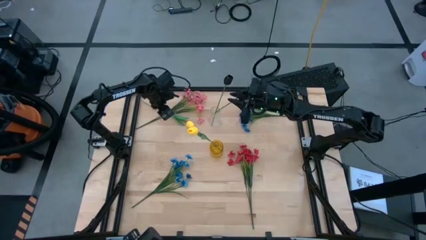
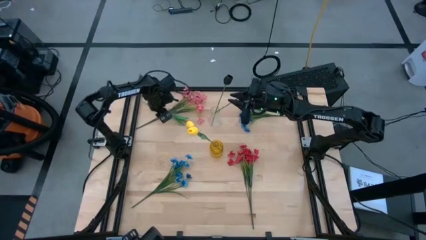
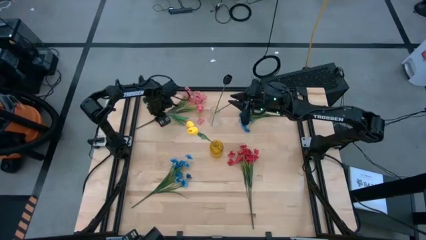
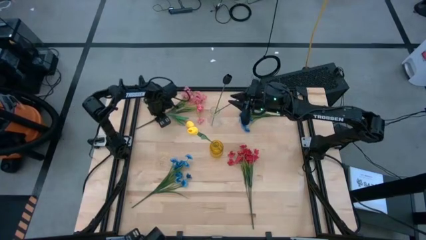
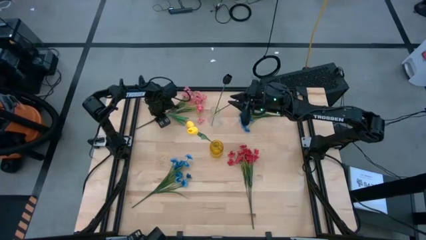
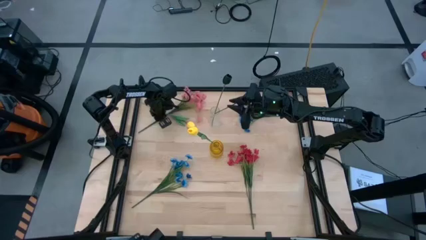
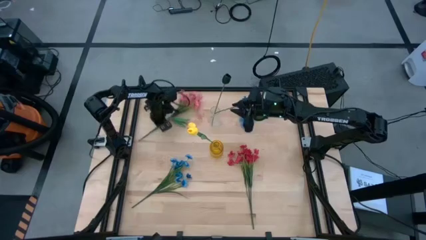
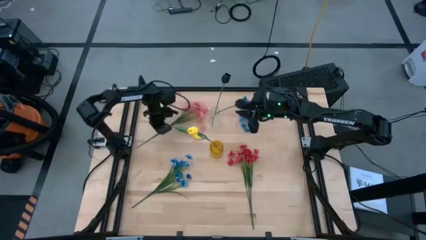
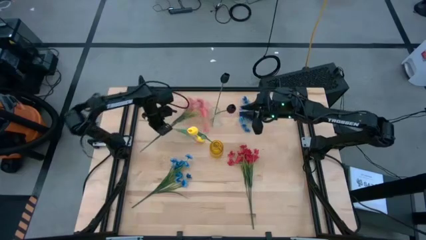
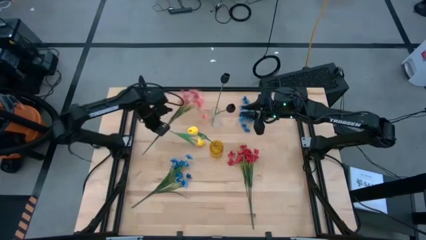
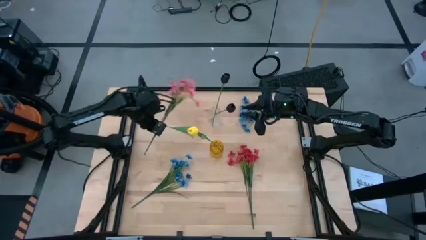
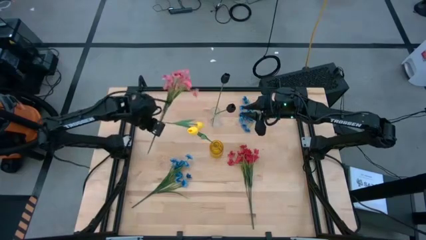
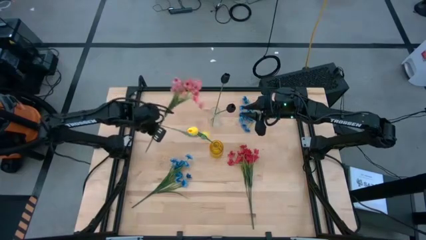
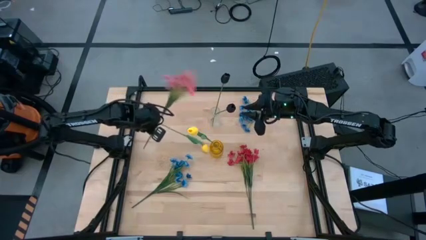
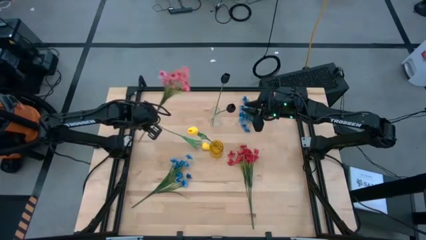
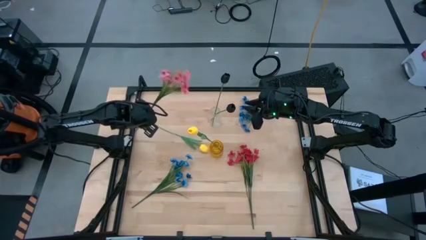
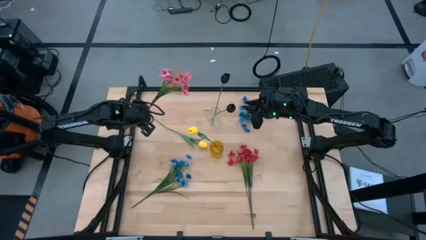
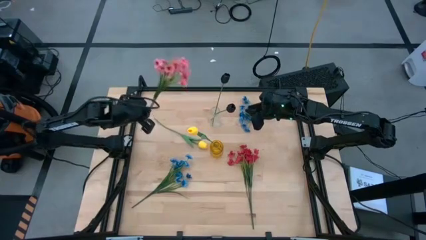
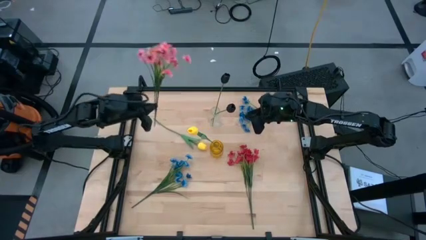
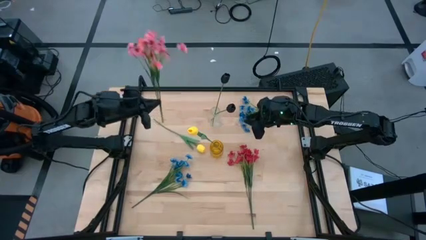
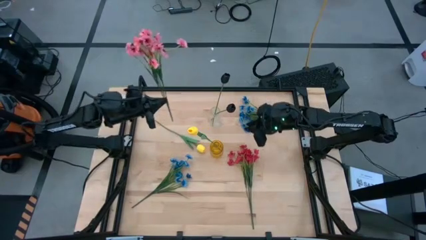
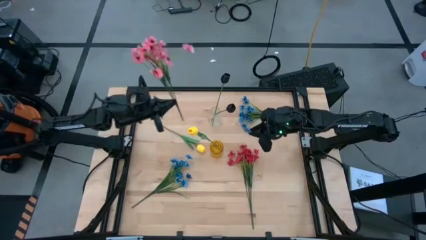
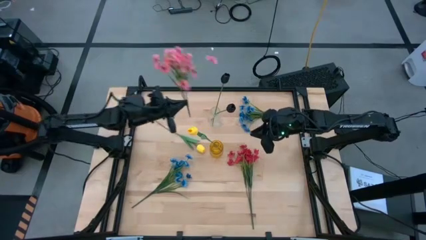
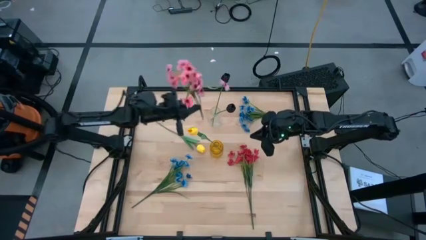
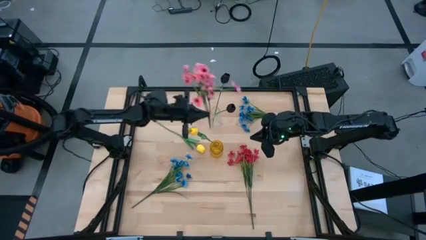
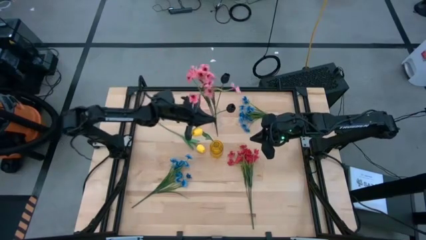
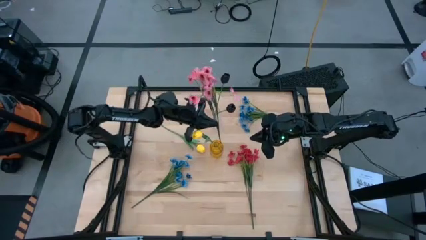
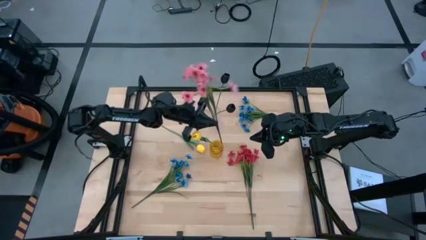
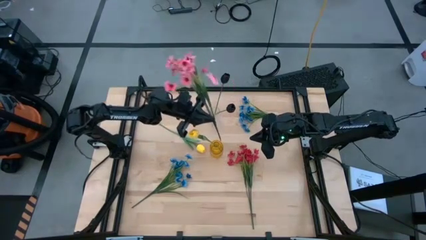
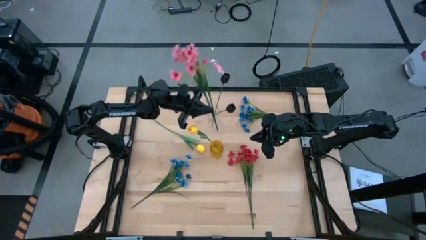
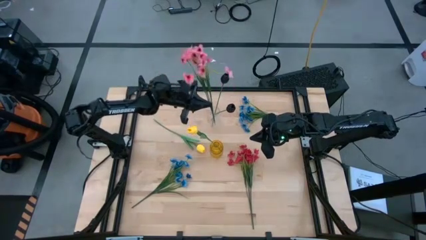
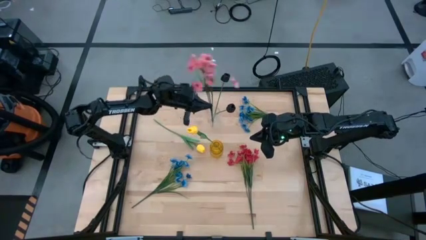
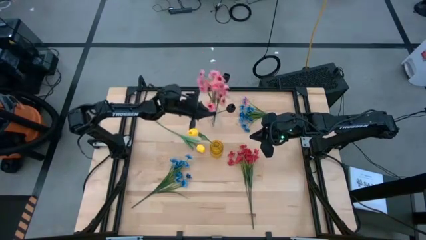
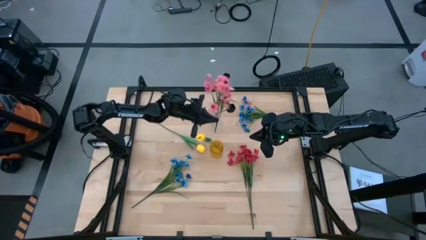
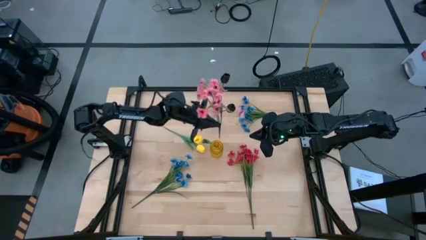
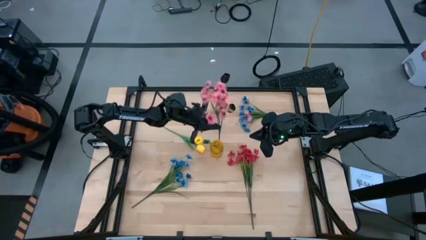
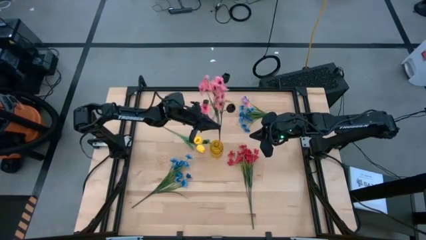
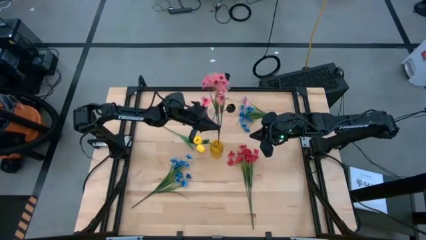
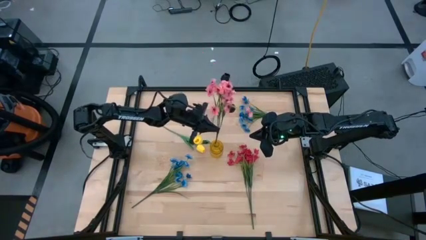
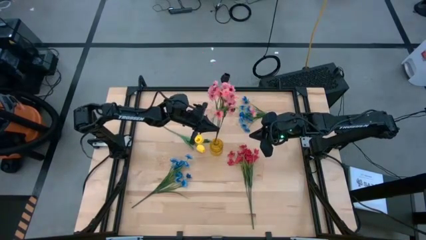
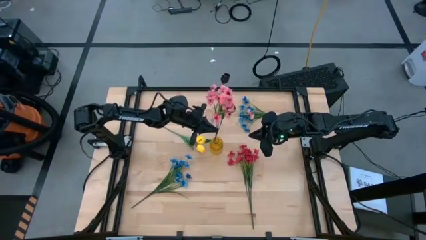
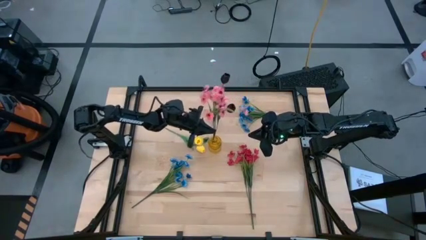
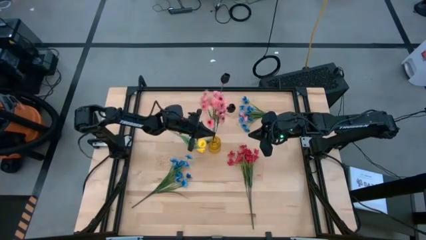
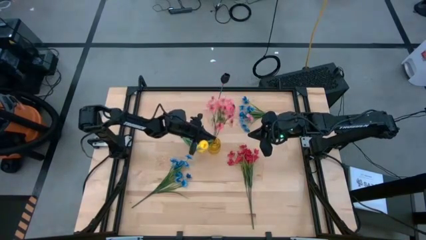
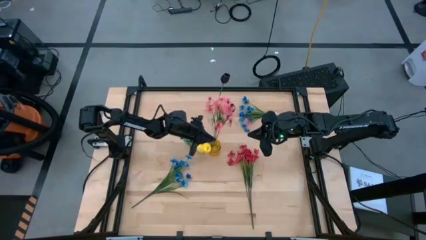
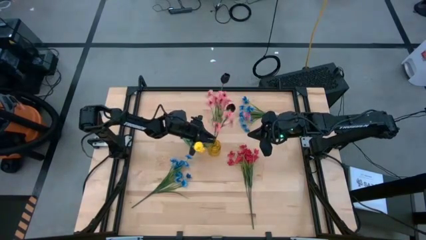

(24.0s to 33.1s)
Task: Sort flowers into vase by color
Put the pink flowers into the yellow flower vase

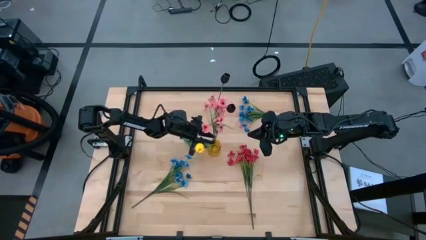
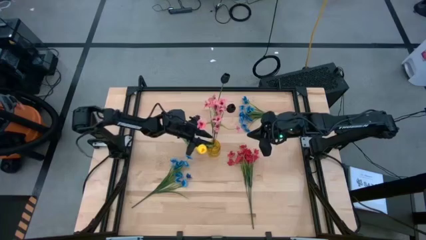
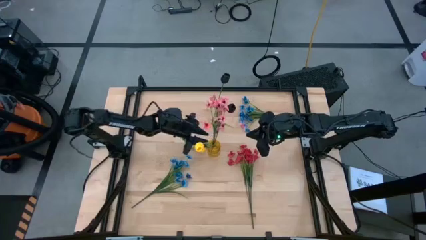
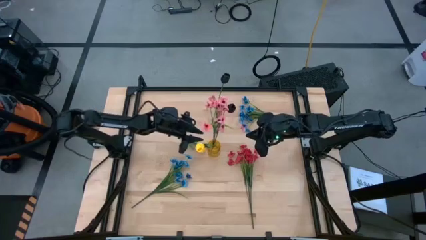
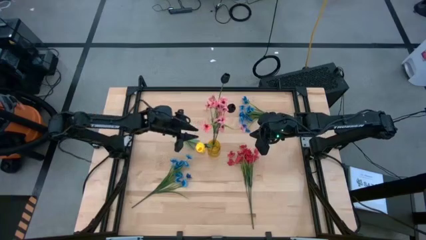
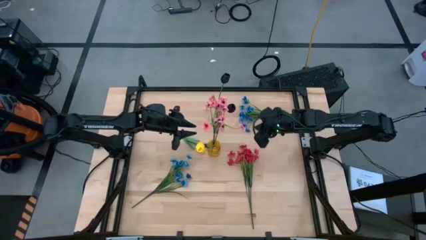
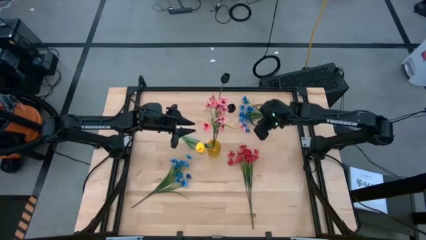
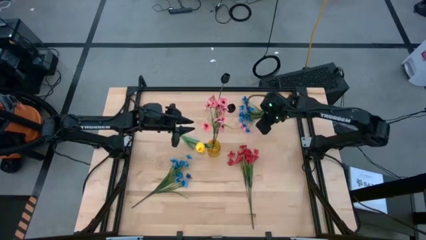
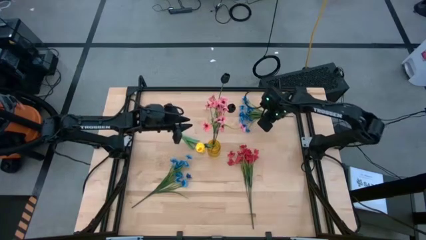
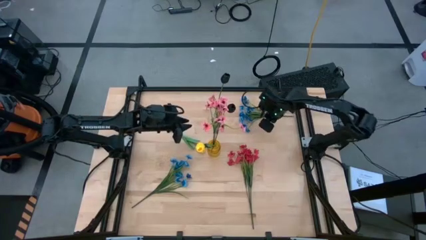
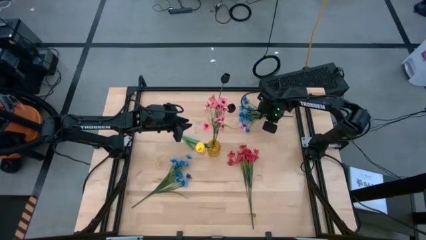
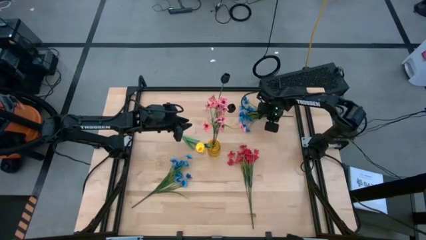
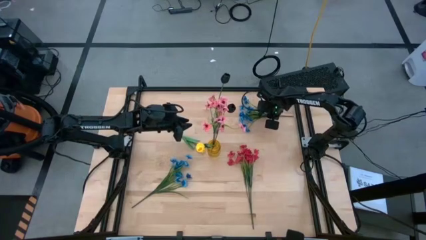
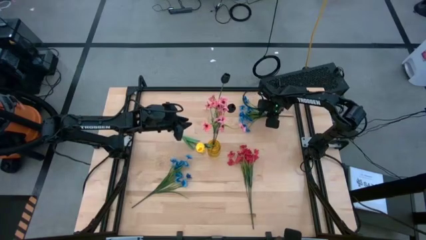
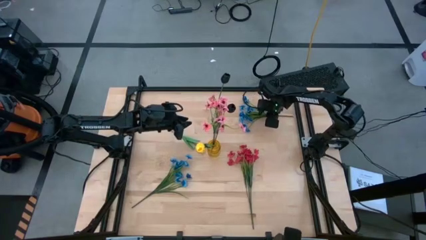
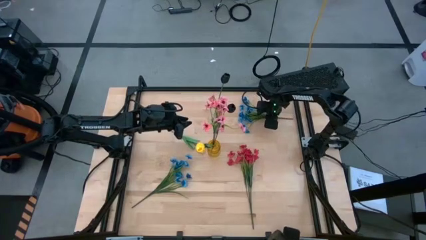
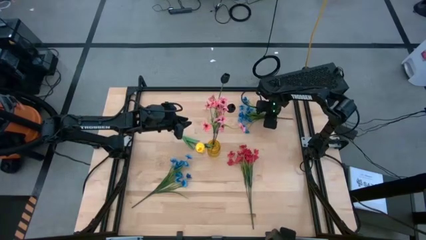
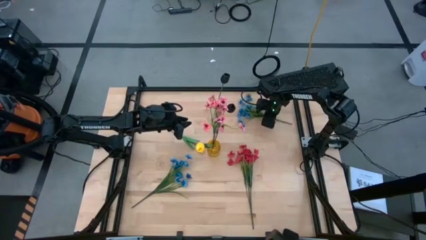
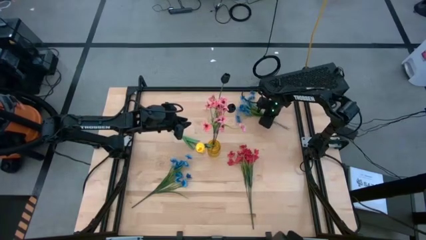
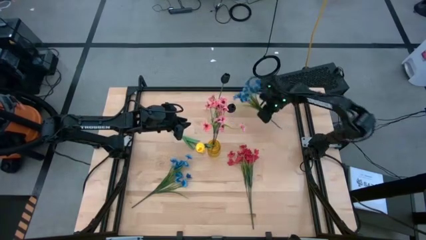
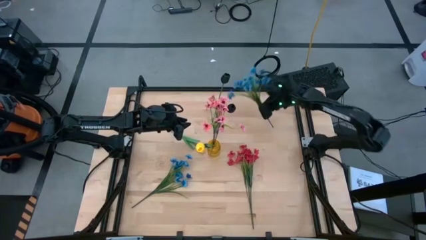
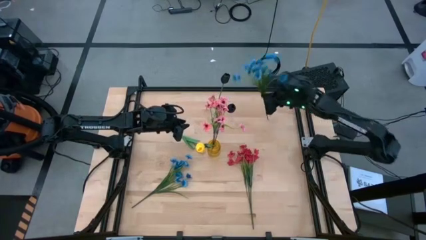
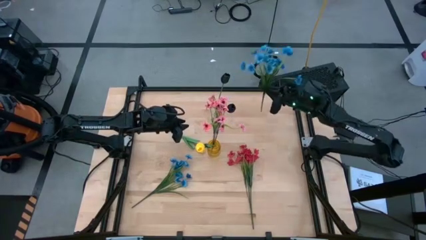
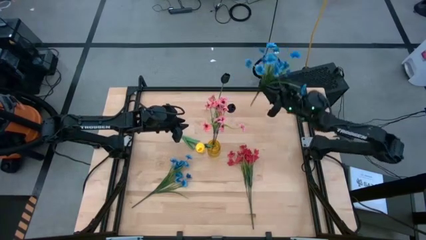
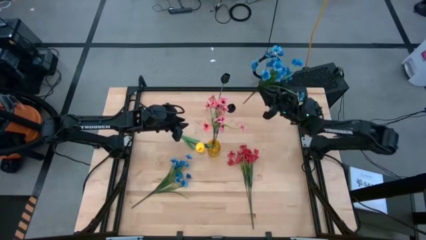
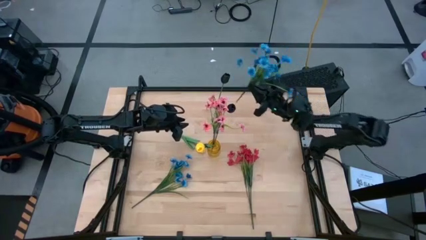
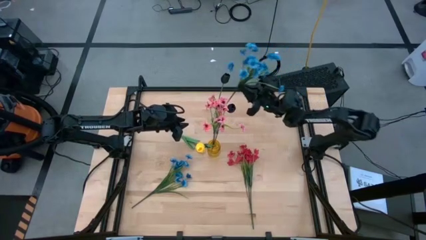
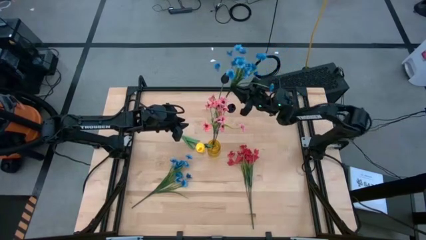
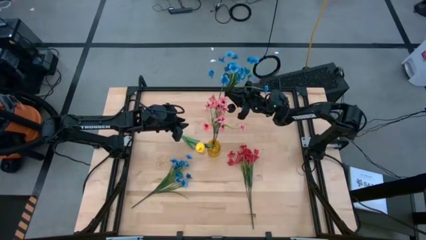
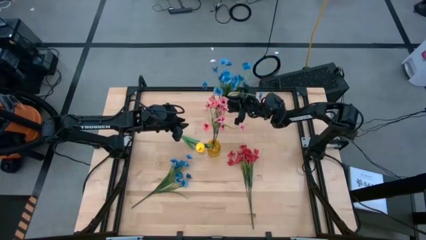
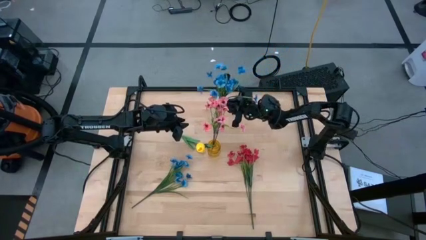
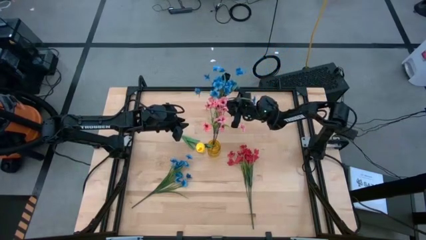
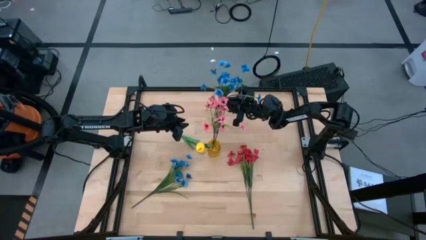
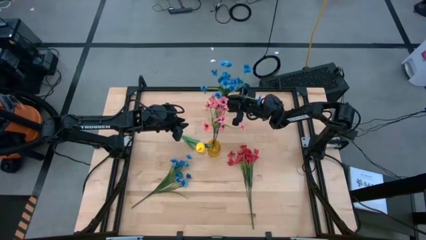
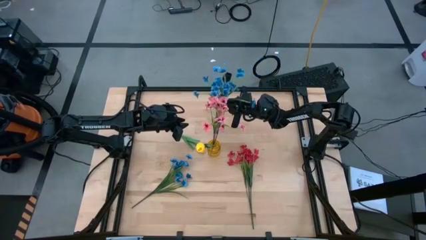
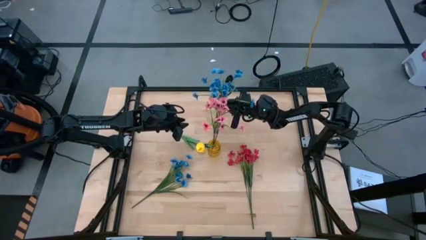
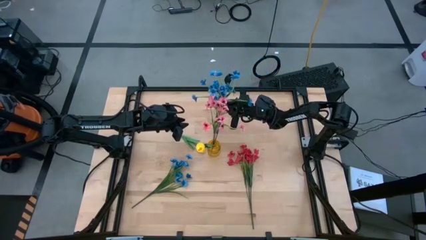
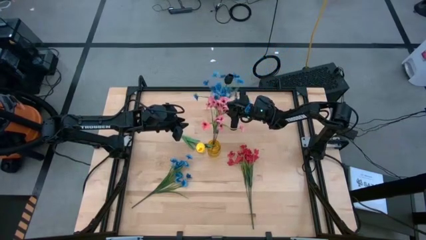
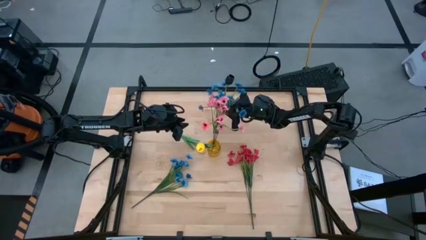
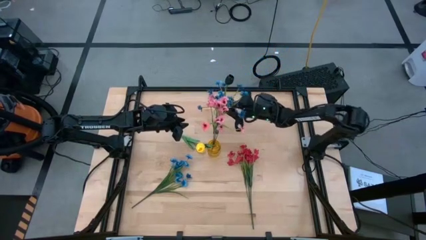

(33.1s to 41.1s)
Put the right blue flowers into the transparent flower vase
